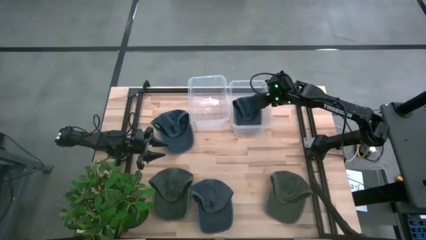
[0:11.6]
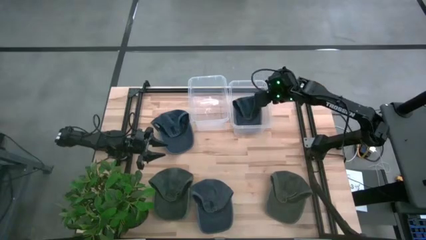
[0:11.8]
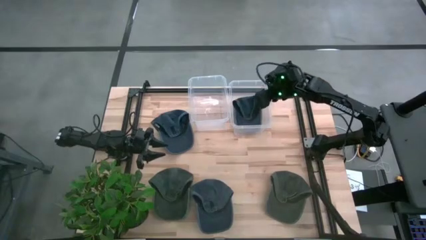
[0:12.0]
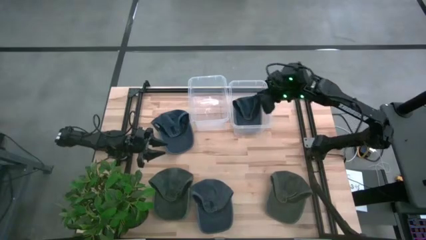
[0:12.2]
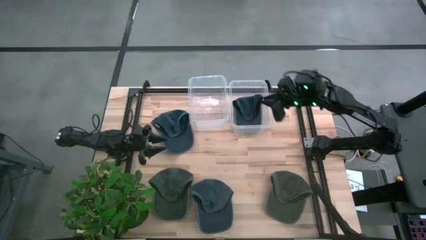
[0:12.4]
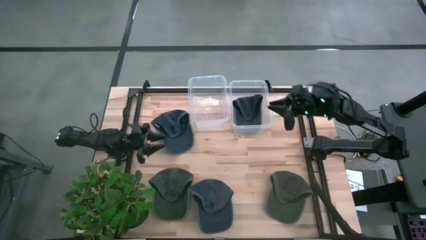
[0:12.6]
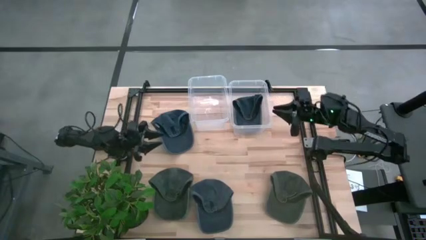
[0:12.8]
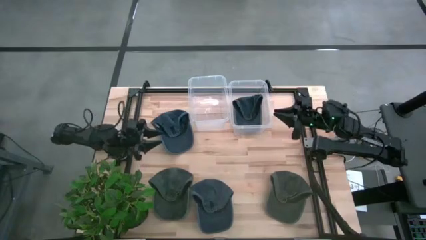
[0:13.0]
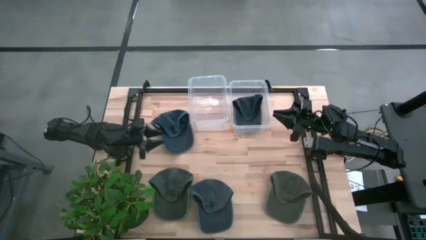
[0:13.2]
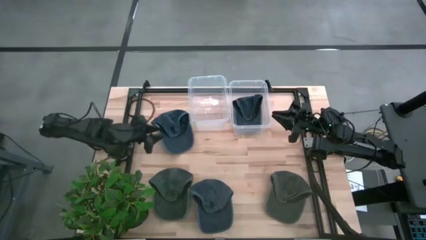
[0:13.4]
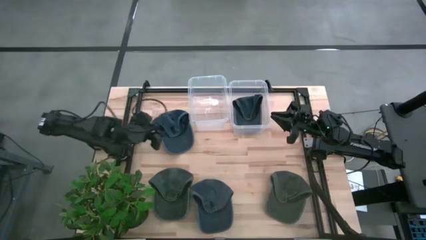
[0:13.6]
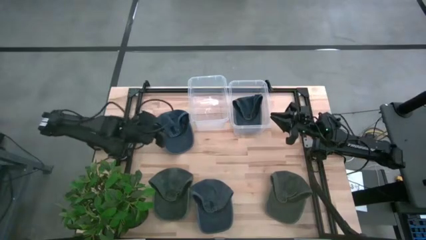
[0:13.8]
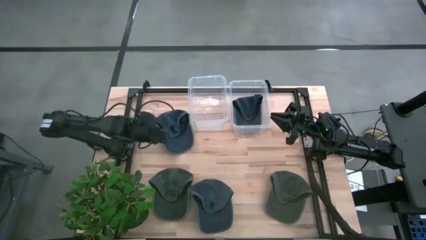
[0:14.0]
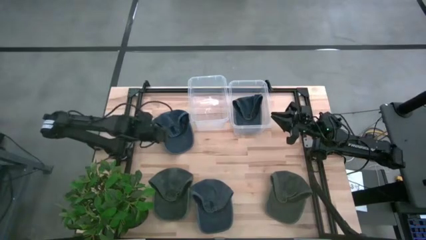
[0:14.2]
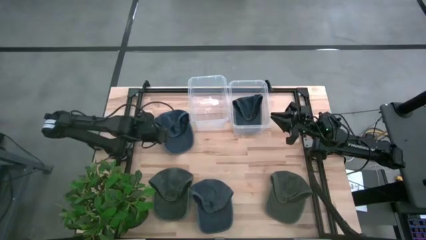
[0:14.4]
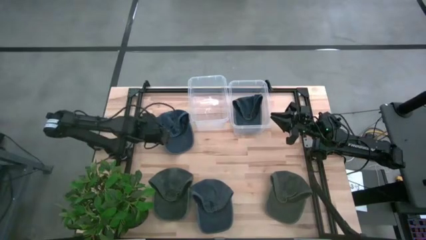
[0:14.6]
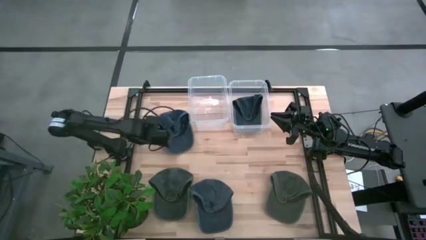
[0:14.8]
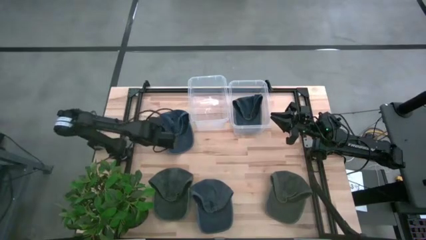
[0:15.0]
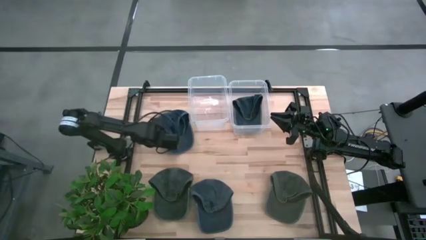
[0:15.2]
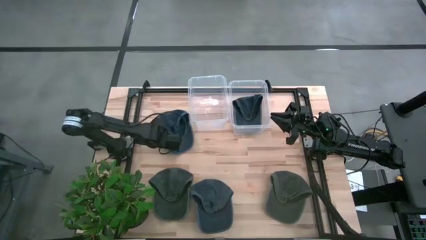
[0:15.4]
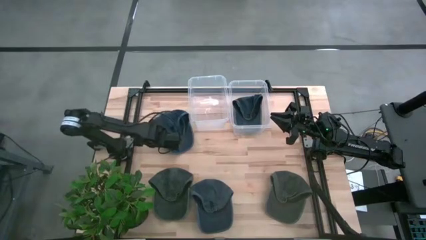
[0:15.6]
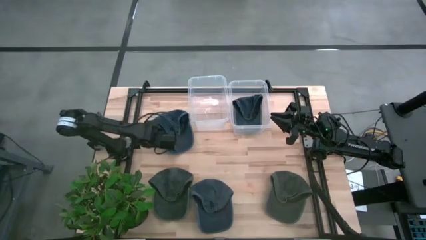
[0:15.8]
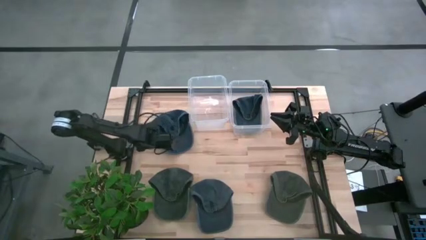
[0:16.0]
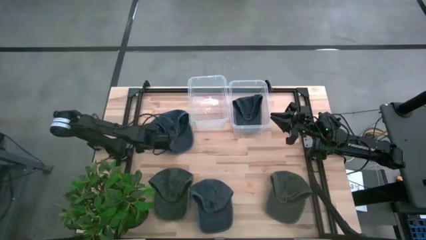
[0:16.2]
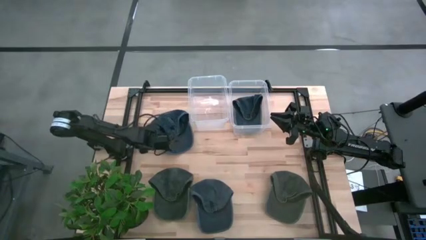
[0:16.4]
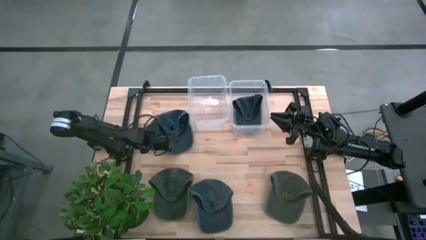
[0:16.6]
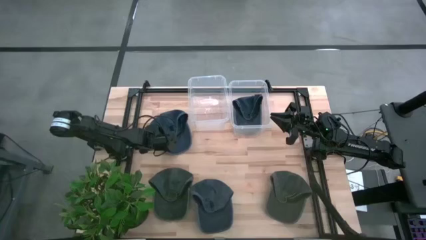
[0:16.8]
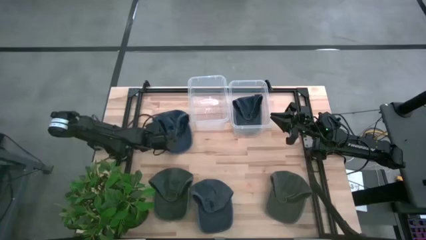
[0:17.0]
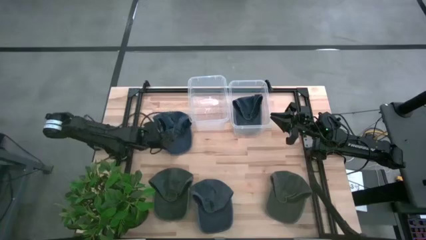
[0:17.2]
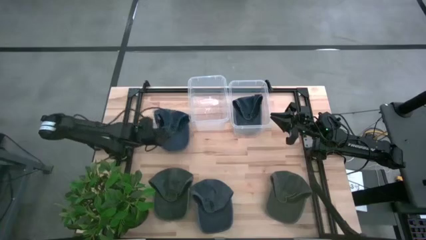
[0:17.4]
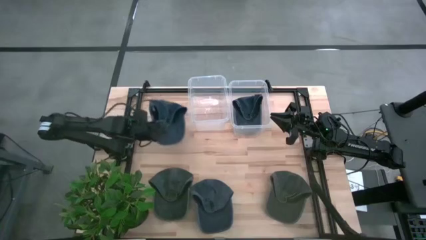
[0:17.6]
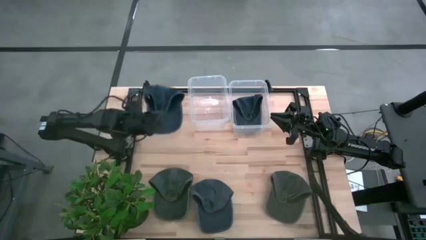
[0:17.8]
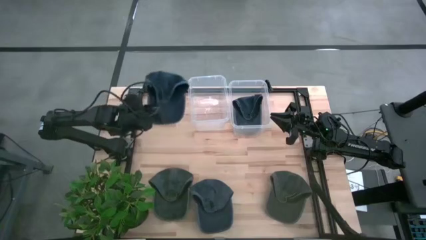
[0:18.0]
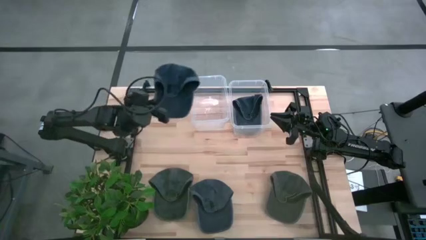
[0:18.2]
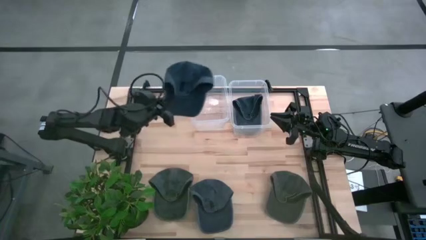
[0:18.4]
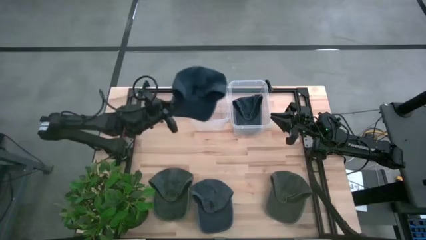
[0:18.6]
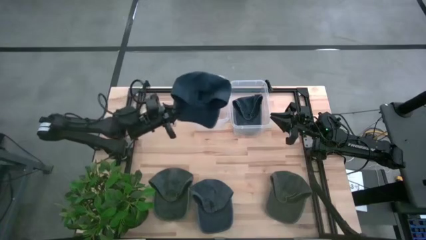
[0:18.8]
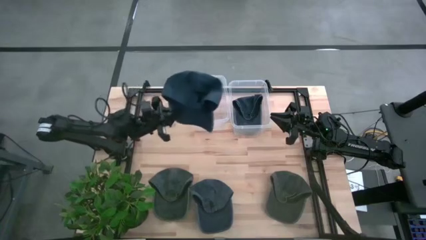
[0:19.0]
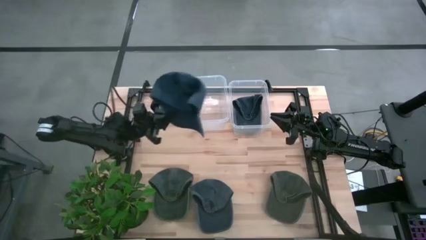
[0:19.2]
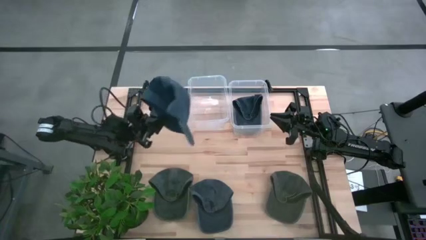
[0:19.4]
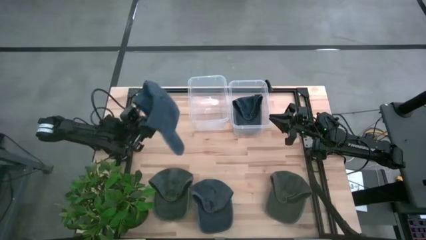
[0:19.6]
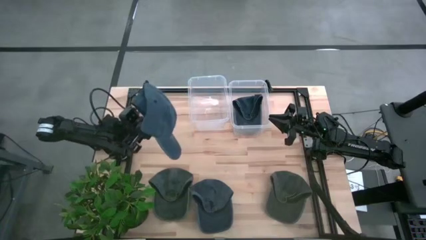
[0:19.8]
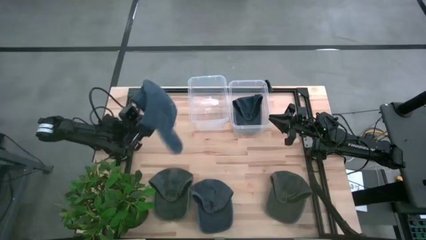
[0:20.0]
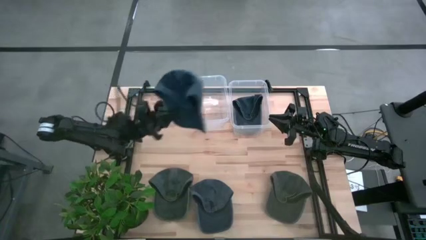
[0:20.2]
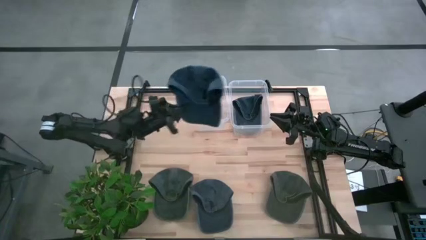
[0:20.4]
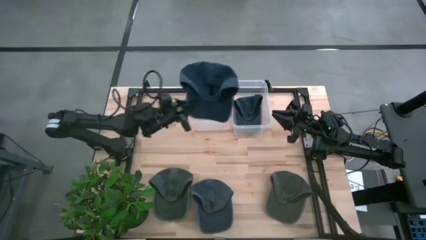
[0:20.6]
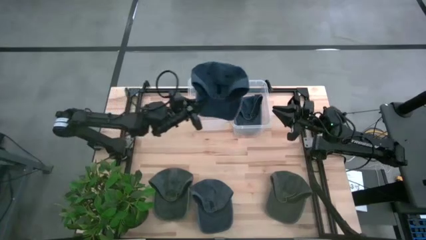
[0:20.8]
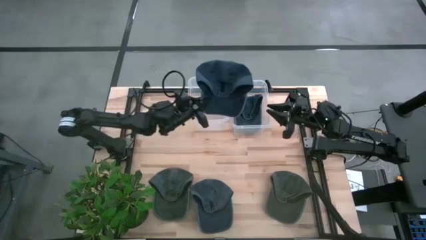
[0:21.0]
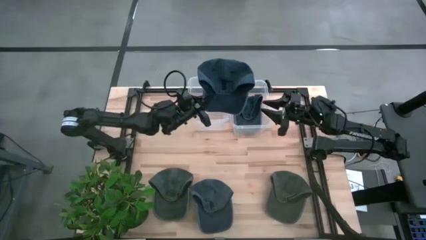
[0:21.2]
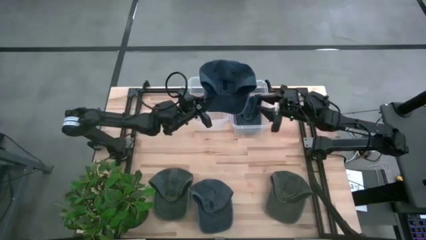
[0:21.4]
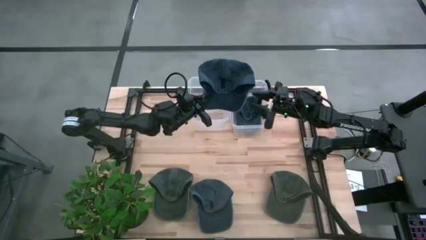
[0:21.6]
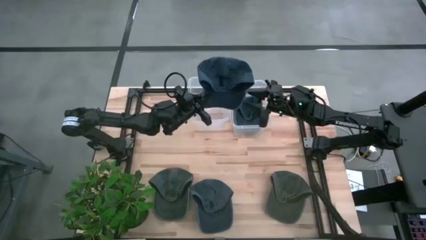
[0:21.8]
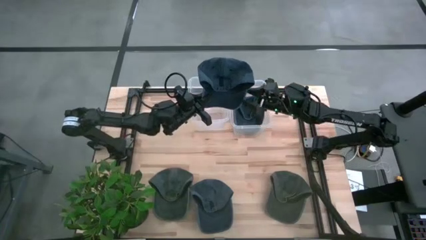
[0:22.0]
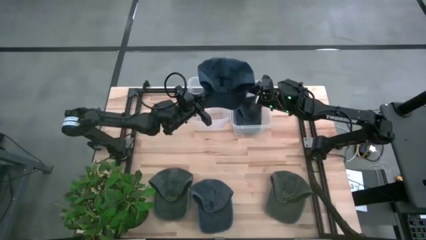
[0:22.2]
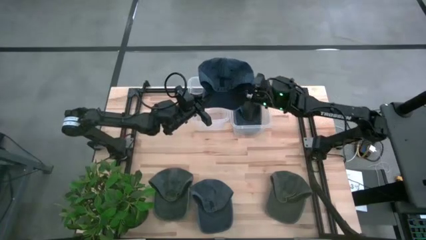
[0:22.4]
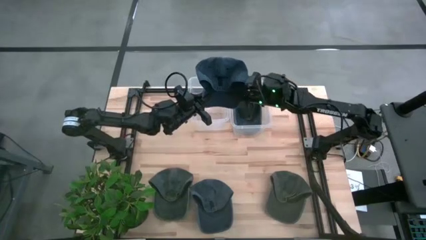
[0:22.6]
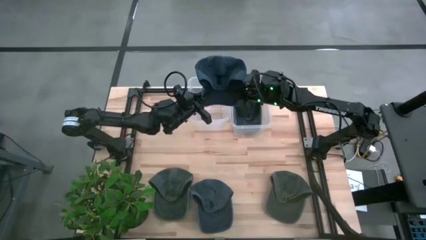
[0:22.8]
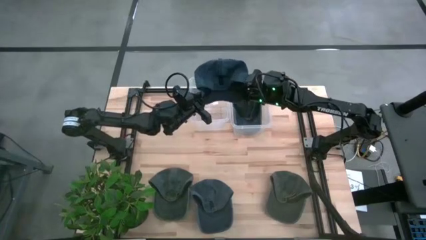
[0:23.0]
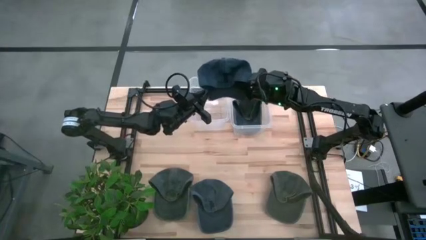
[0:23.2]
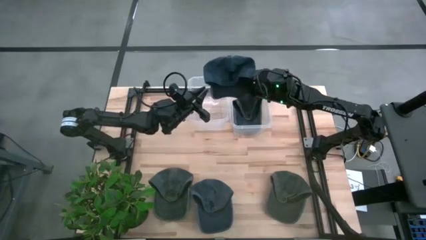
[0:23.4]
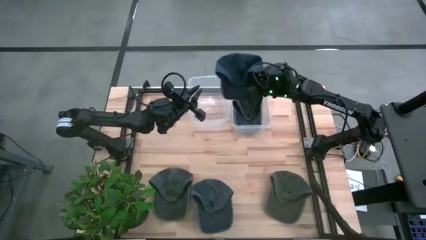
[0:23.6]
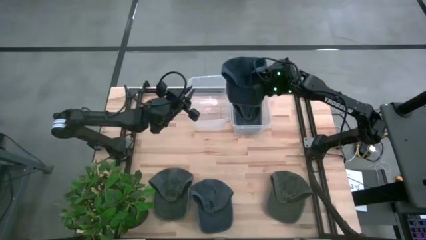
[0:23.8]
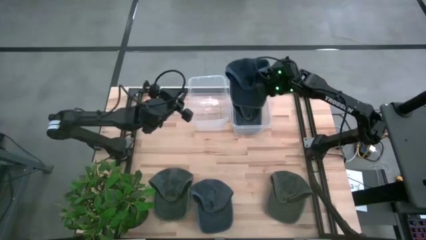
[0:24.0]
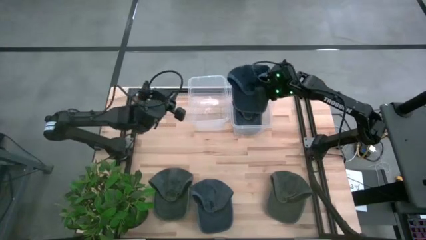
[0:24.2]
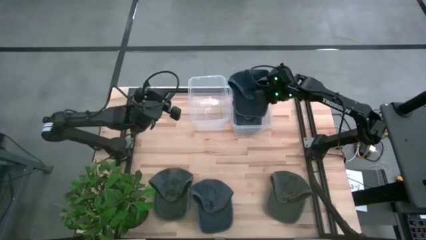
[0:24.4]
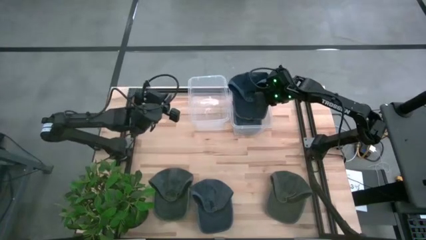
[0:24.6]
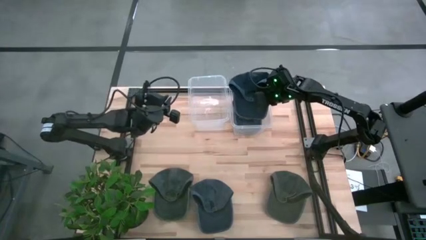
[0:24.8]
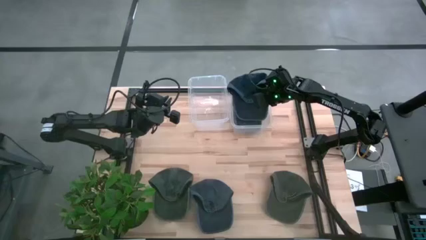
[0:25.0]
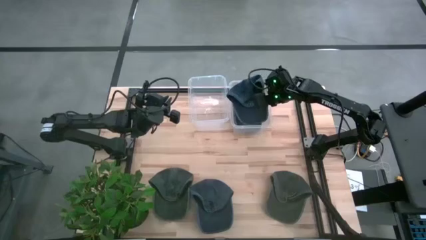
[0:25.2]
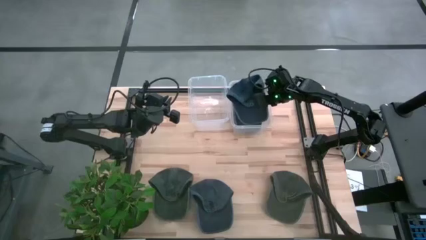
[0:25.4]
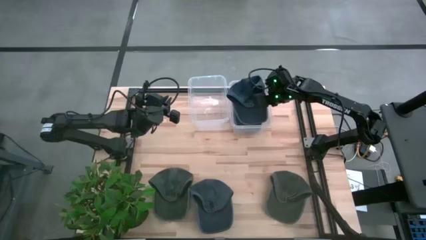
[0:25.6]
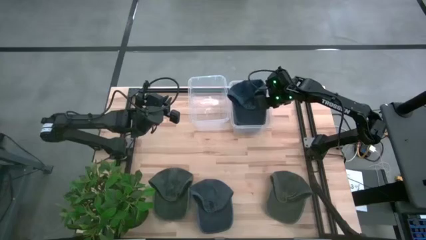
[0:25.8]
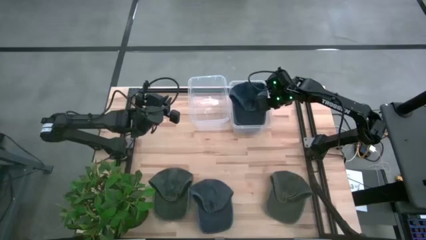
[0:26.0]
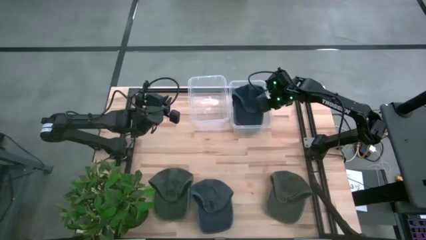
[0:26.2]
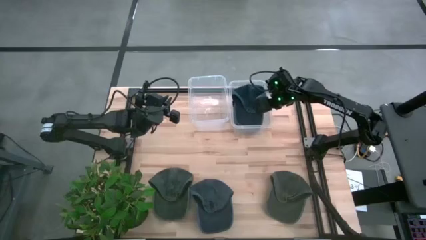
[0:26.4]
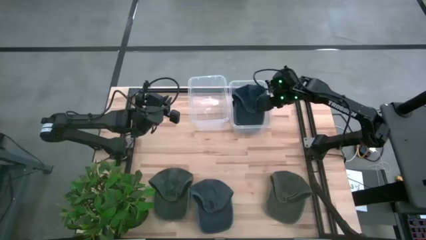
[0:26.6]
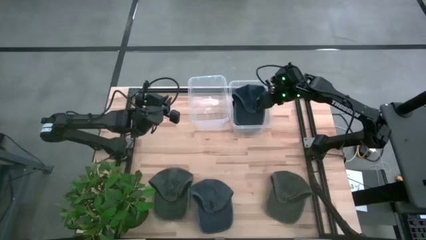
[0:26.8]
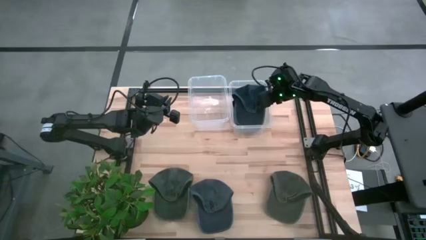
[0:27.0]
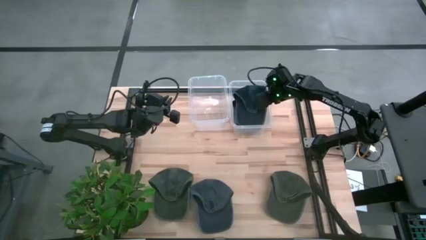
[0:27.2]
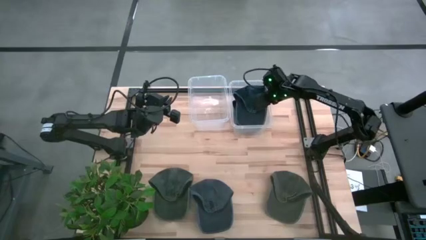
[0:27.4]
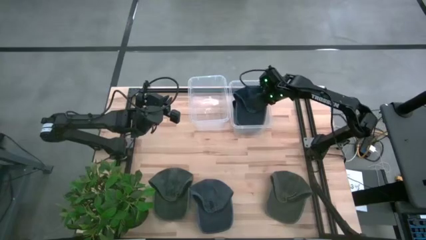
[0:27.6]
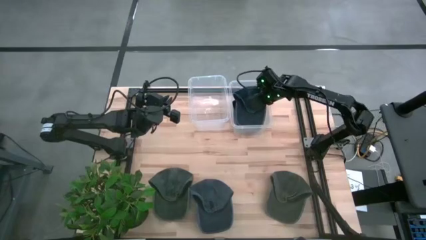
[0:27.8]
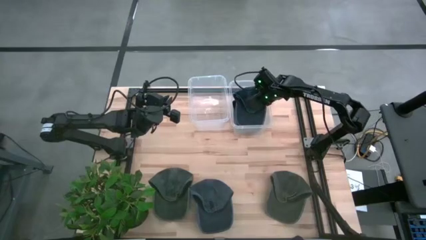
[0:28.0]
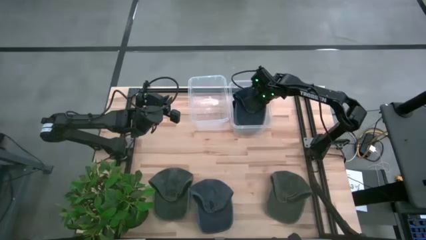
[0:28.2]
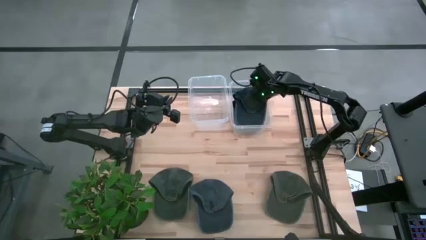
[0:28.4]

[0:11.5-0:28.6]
Task: Pick & Place hat
Put the top blue cap into the right transparent bin
